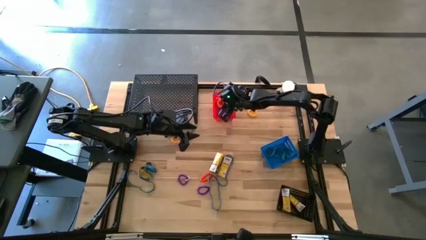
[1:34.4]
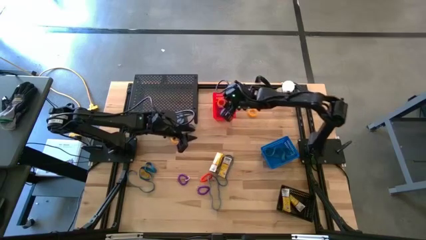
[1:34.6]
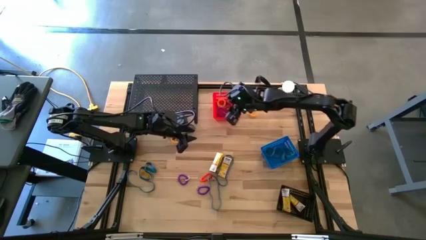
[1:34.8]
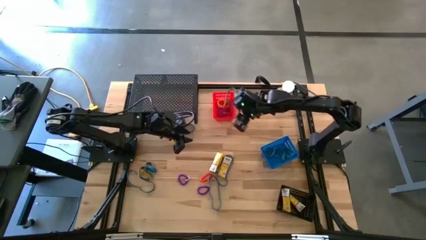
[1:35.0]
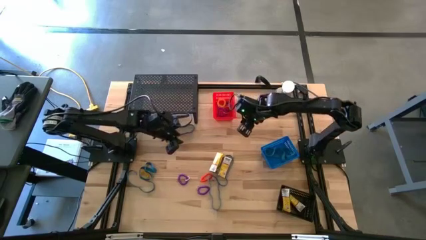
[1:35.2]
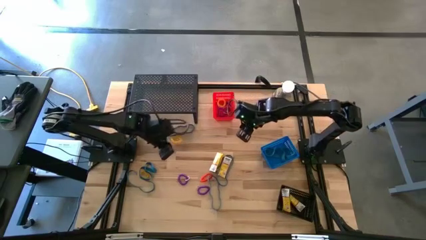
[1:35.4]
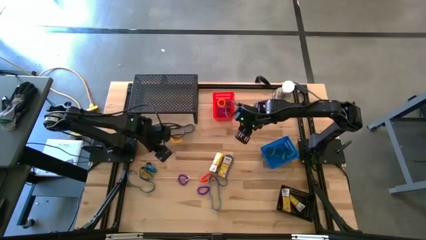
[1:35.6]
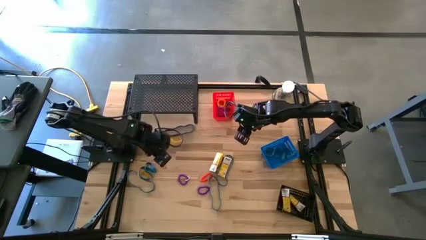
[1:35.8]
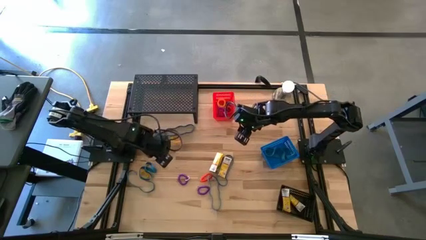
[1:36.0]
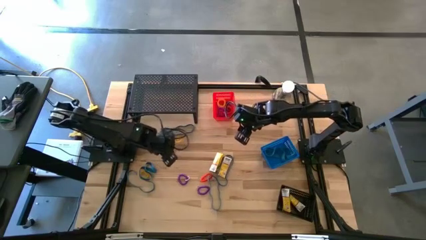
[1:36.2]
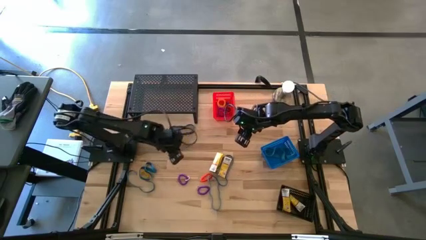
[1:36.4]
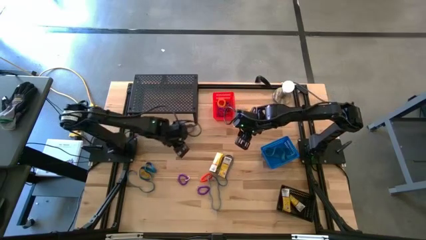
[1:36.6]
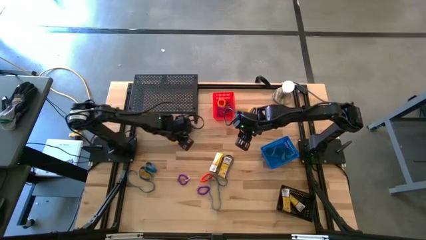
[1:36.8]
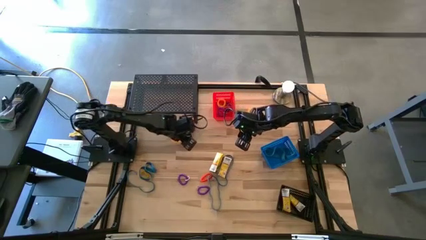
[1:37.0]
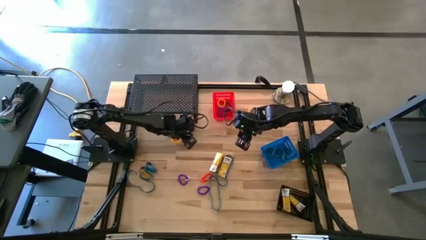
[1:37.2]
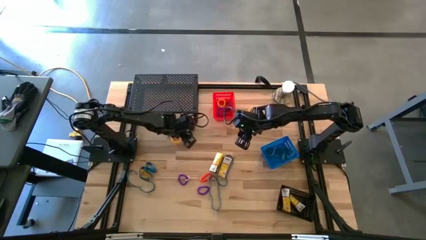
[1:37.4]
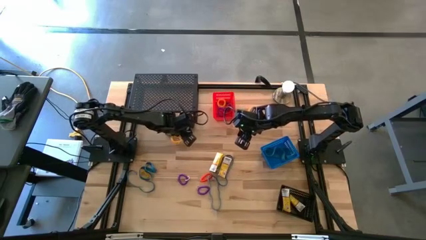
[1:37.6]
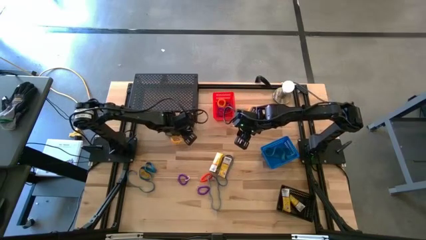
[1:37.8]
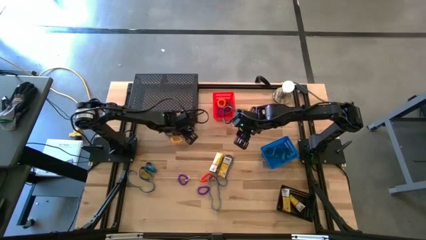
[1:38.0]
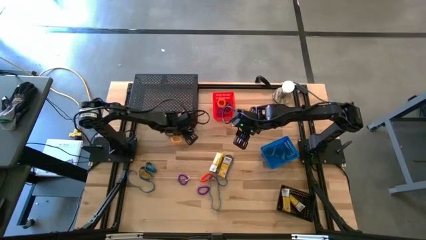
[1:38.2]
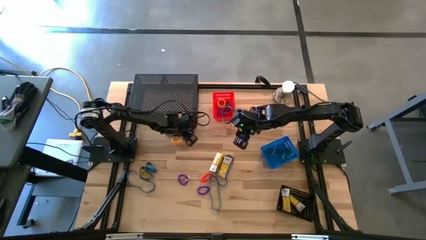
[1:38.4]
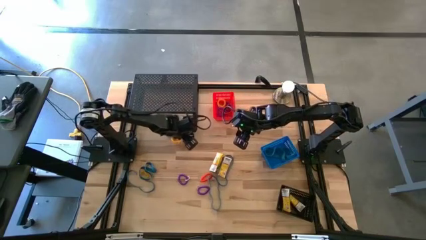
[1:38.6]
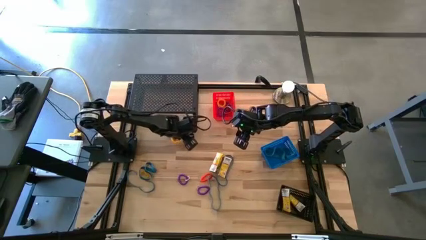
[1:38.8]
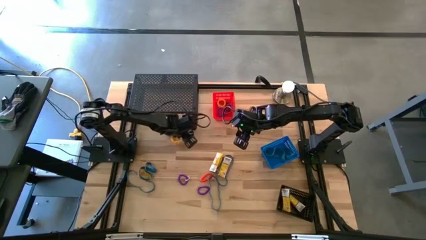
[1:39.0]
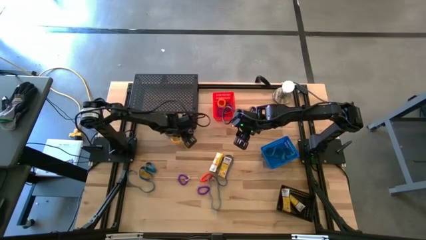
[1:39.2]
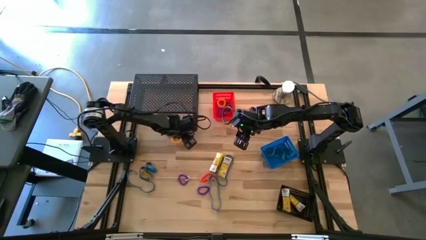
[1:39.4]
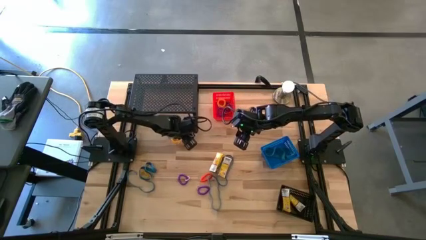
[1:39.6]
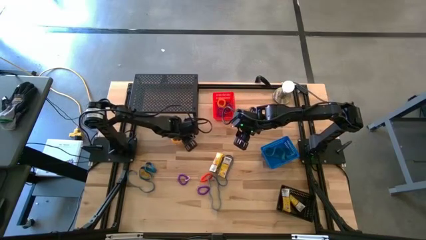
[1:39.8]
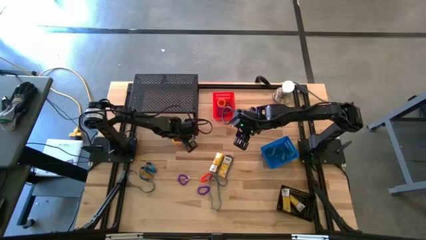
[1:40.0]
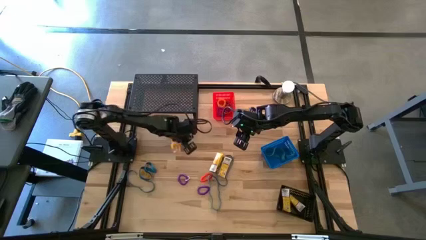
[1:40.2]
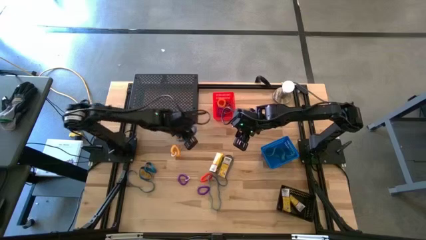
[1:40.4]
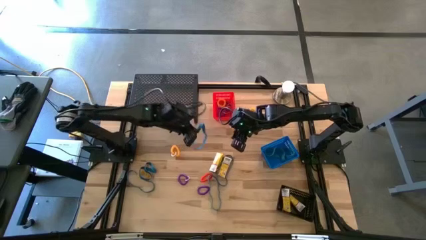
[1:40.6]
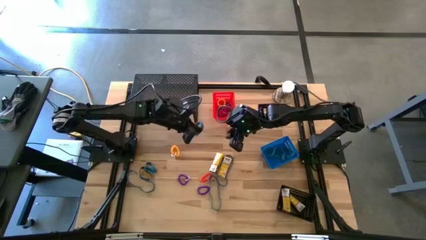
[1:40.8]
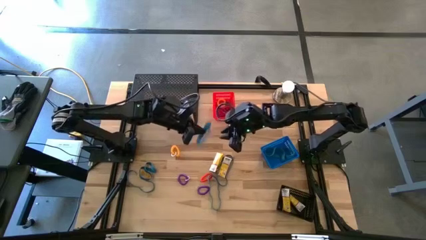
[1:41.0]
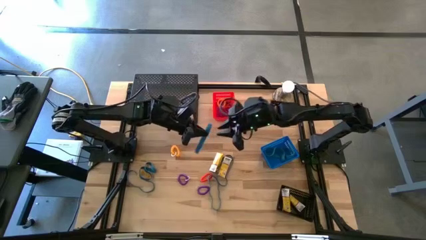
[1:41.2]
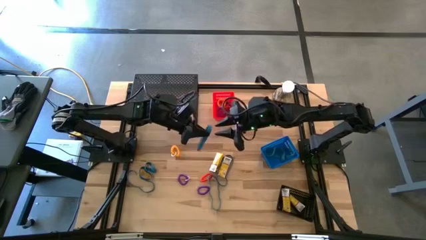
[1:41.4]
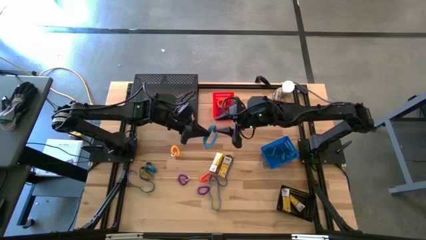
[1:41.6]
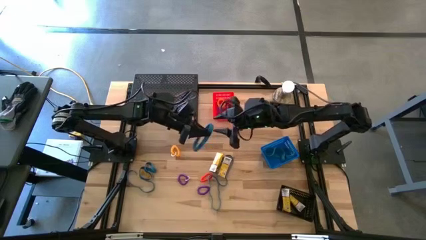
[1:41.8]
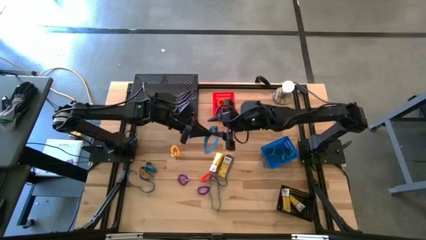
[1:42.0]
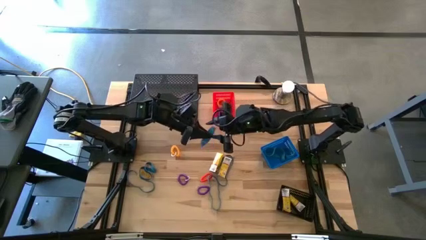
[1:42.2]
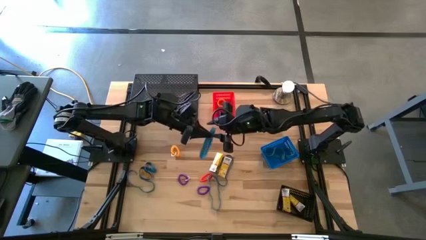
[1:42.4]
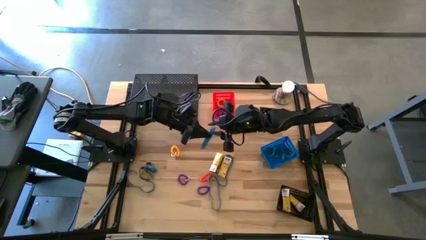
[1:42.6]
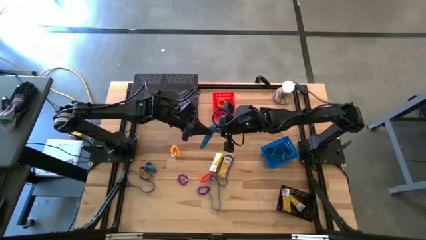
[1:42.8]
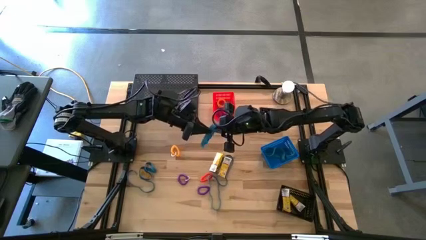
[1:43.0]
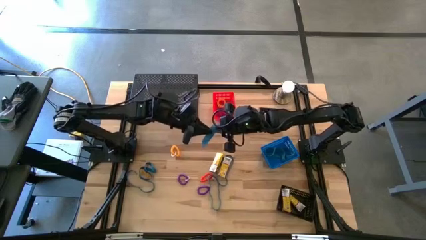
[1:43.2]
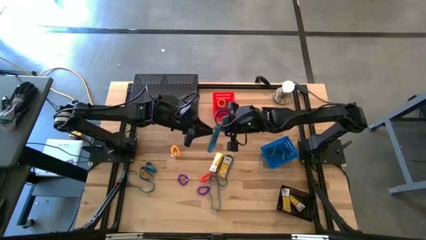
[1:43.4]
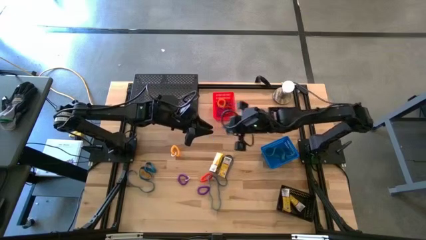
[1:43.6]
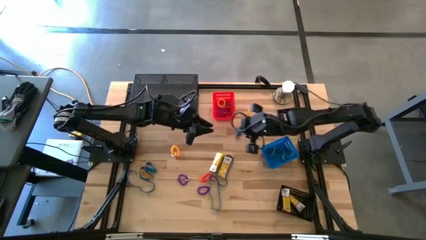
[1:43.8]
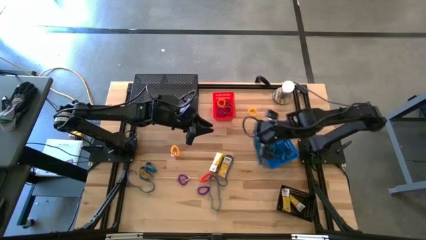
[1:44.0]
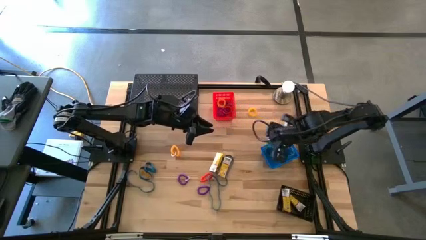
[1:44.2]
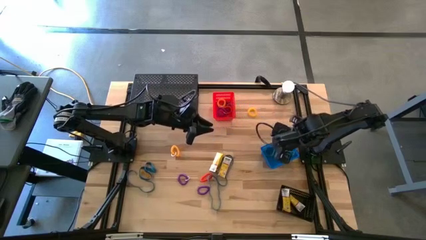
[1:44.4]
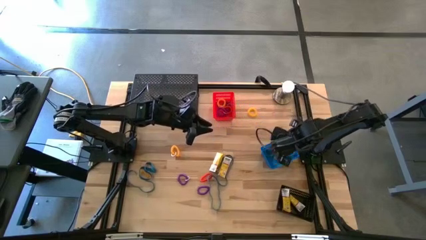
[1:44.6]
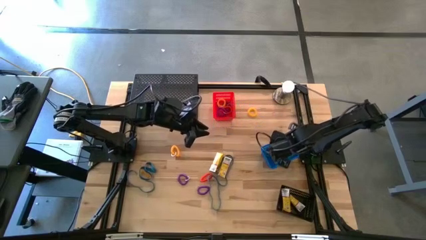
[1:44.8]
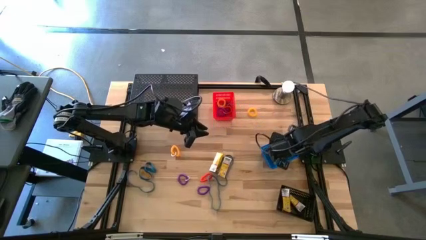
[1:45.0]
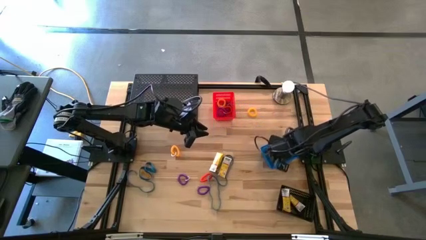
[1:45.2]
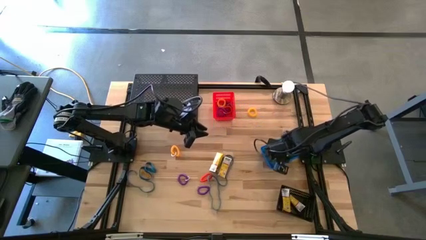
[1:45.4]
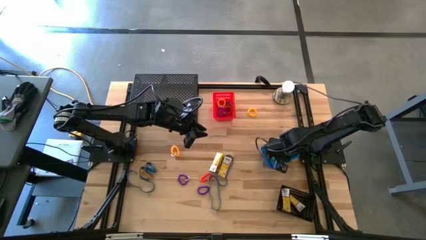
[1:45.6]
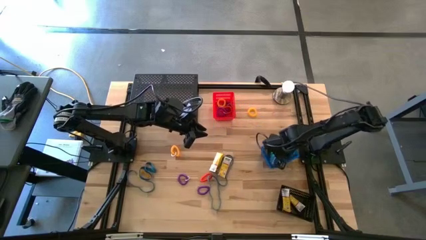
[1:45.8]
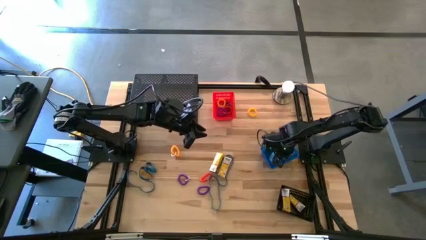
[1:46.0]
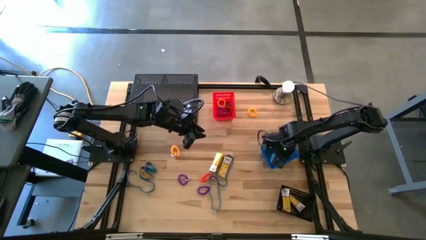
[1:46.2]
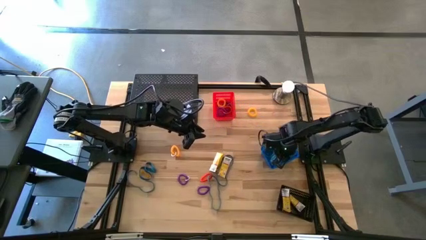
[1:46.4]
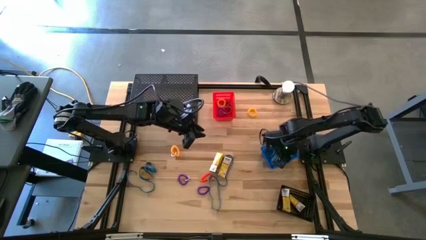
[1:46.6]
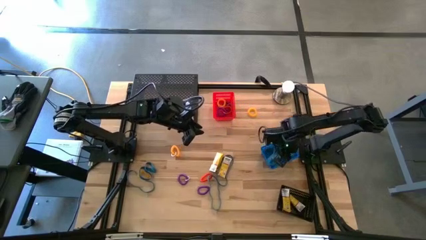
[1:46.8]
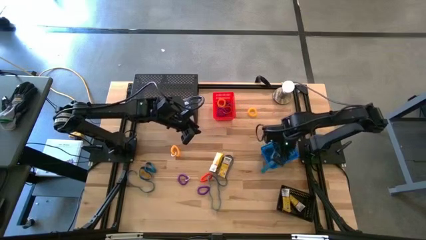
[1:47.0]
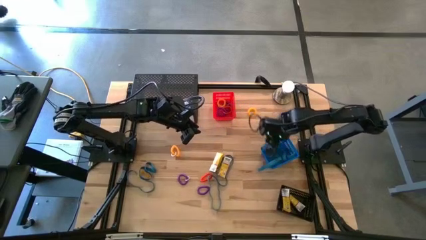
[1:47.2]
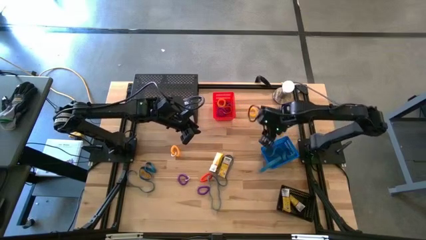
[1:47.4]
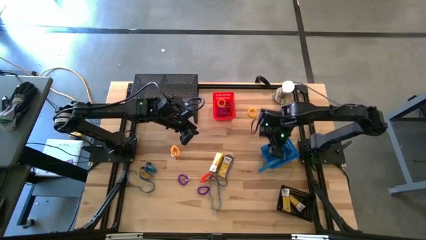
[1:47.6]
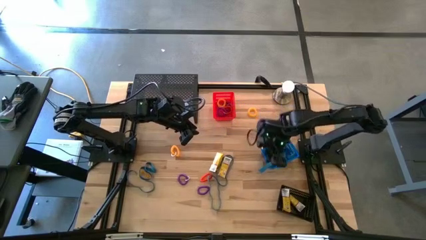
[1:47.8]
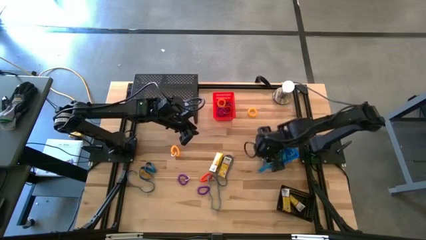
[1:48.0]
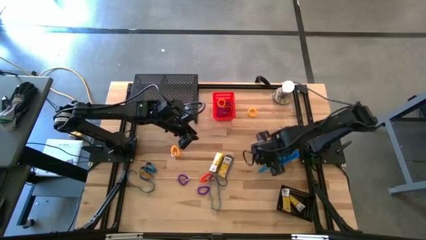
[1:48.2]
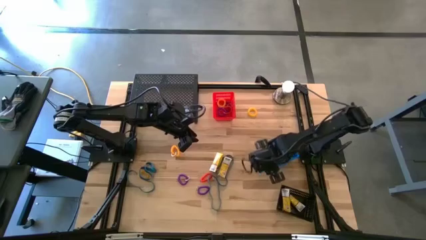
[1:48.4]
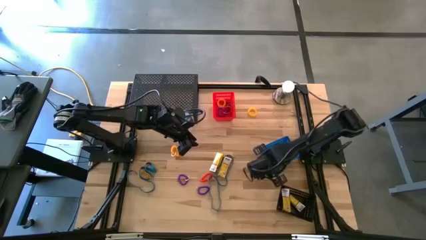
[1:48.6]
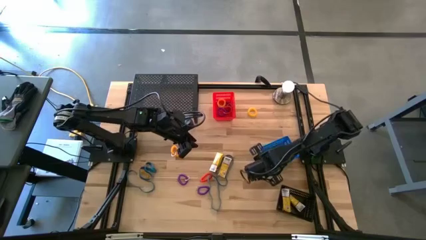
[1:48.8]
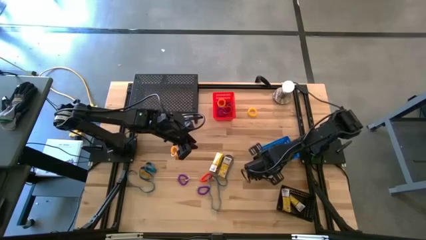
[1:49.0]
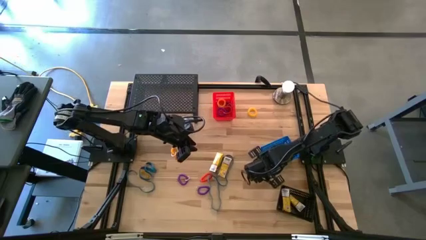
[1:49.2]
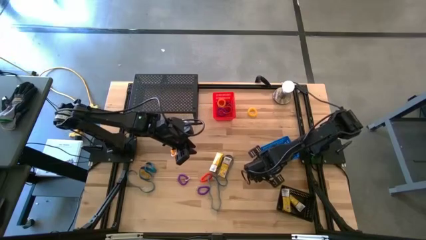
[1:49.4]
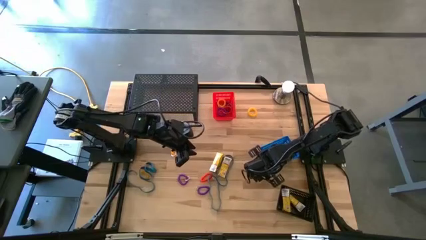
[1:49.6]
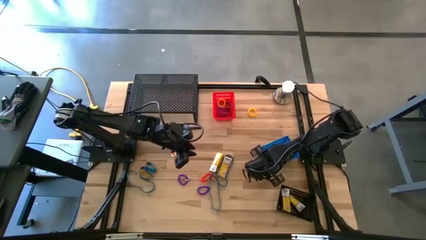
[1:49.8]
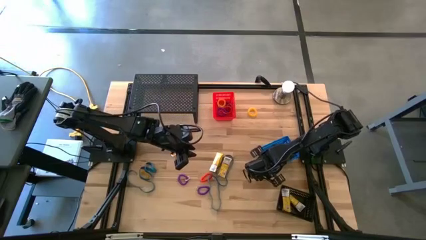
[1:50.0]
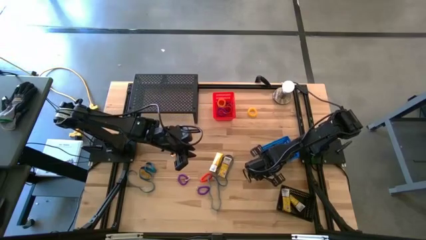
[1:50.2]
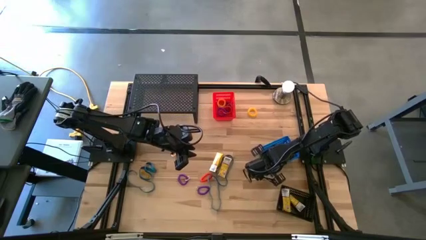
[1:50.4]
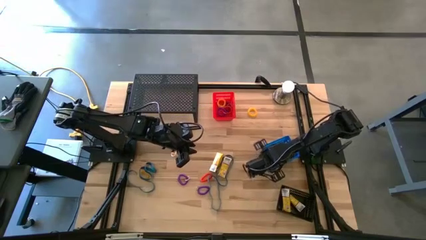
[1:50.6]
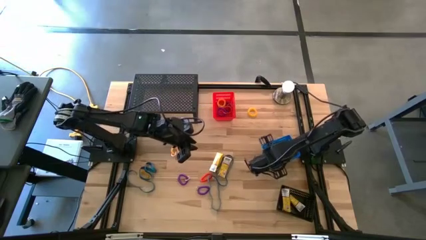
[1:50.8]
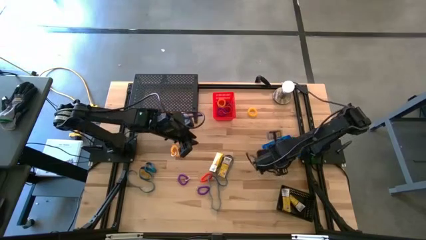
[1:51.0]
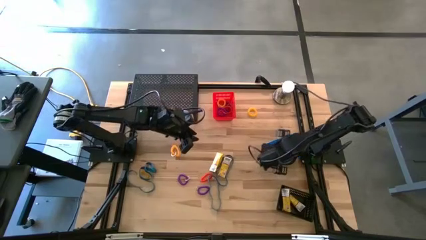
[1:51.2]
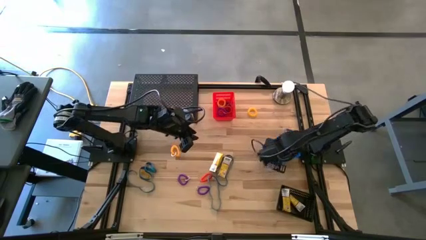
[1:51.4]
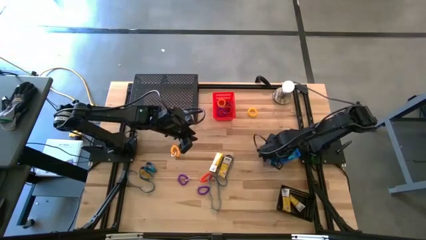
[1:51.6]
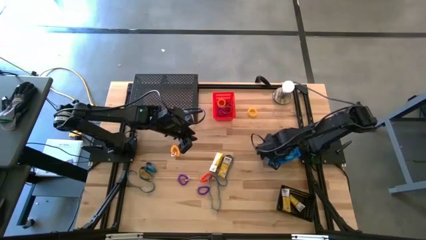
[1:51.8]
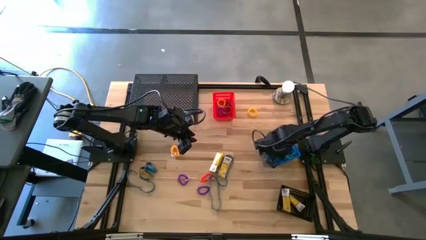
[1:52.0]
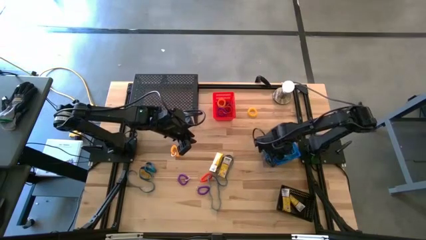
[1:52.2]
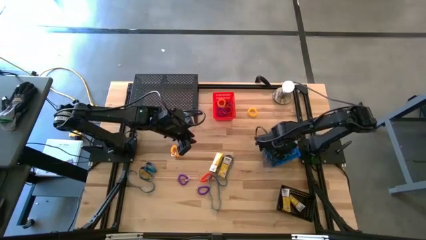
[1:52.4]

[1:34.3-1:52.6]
Task: Pick & Place Office Desk Supplies
Put the blue rubber band into the blue bin
